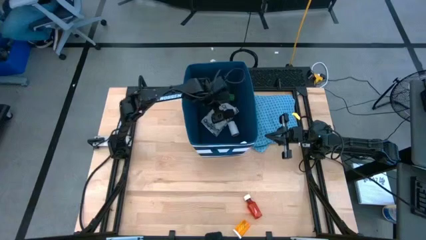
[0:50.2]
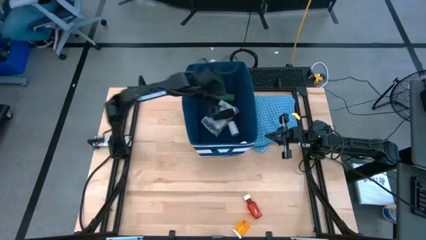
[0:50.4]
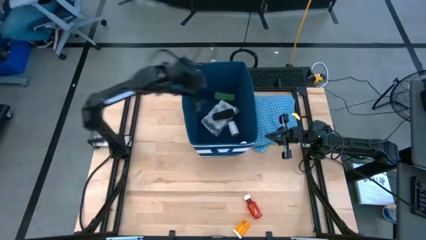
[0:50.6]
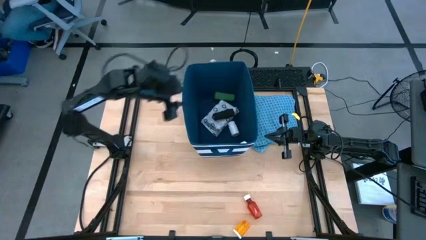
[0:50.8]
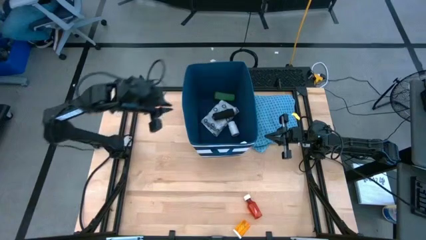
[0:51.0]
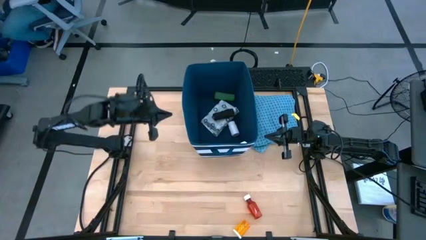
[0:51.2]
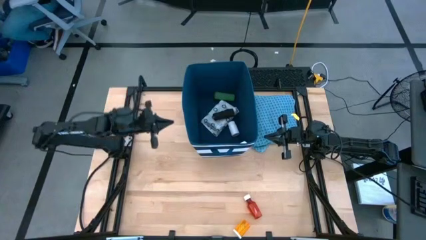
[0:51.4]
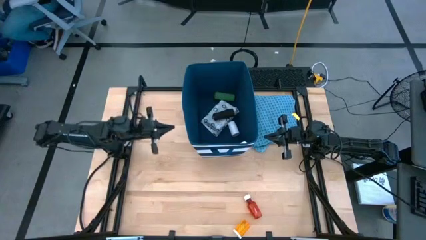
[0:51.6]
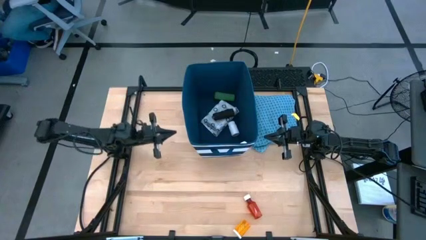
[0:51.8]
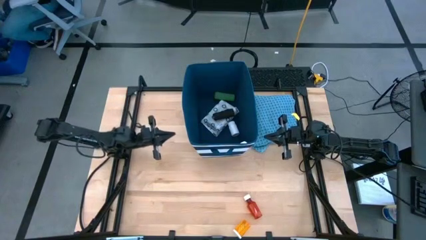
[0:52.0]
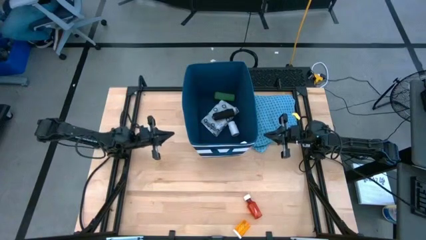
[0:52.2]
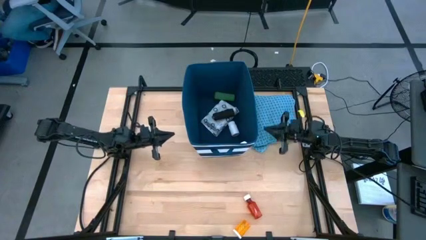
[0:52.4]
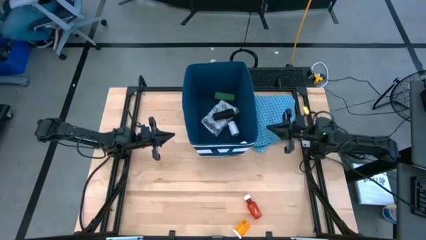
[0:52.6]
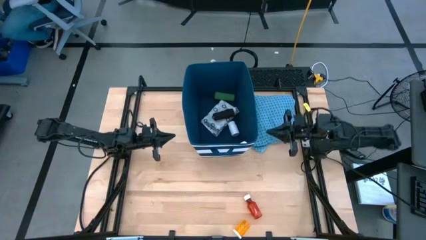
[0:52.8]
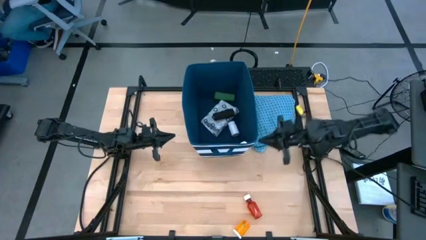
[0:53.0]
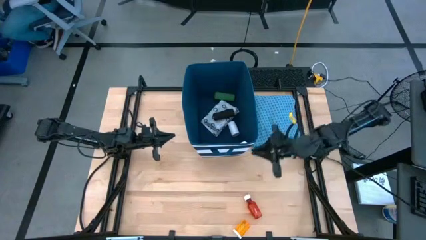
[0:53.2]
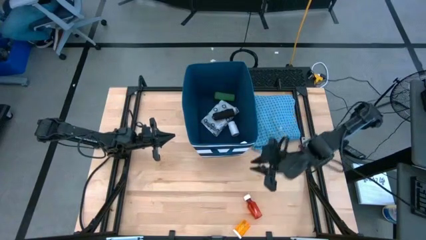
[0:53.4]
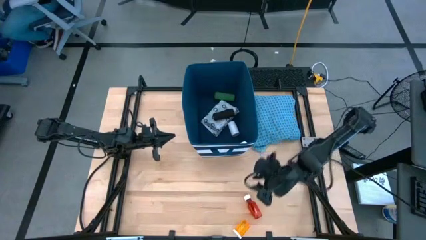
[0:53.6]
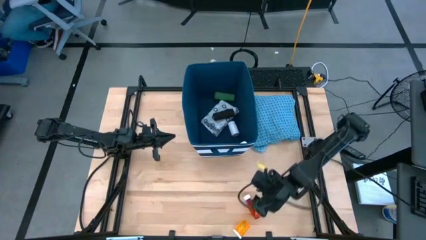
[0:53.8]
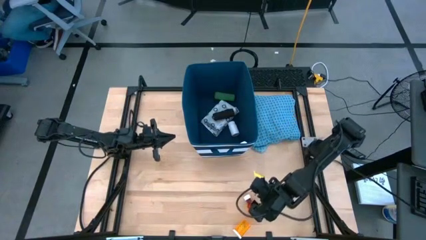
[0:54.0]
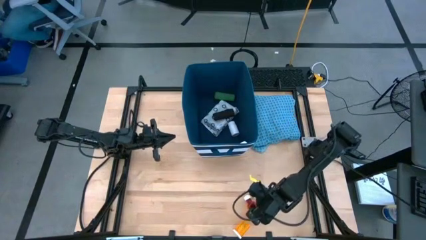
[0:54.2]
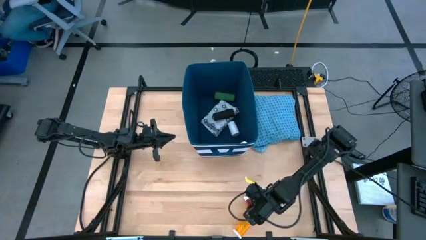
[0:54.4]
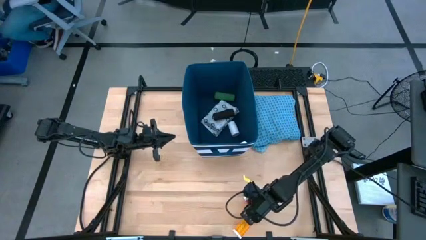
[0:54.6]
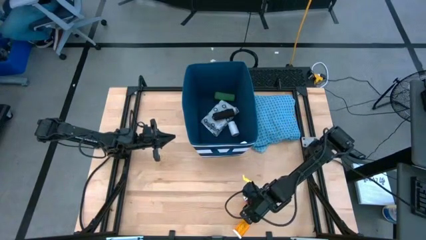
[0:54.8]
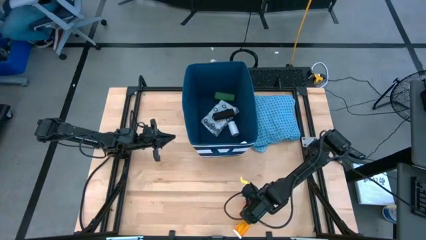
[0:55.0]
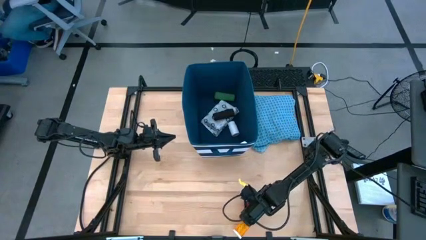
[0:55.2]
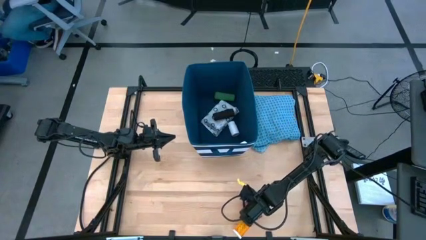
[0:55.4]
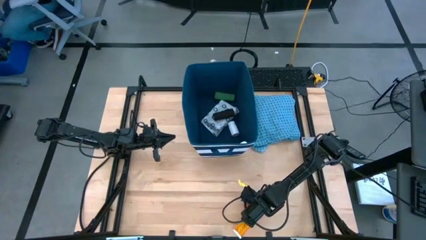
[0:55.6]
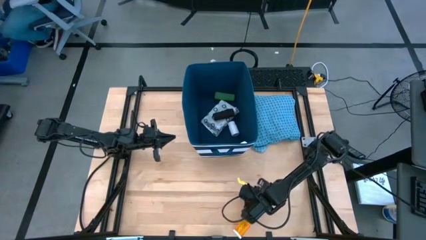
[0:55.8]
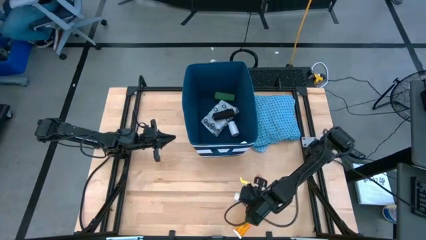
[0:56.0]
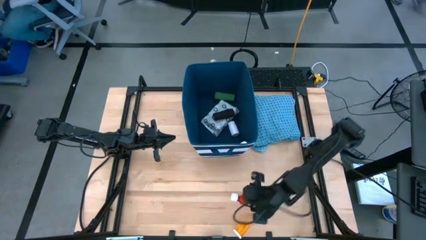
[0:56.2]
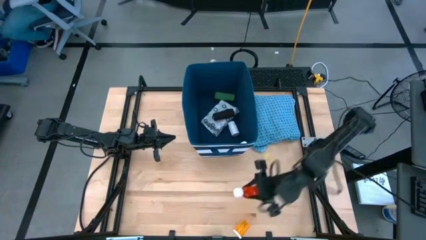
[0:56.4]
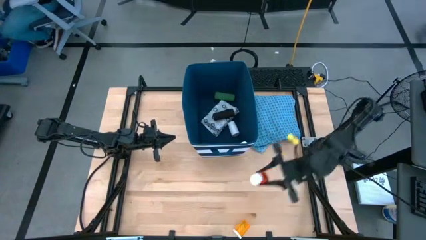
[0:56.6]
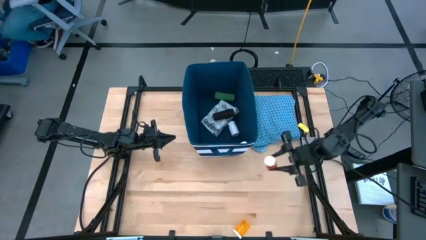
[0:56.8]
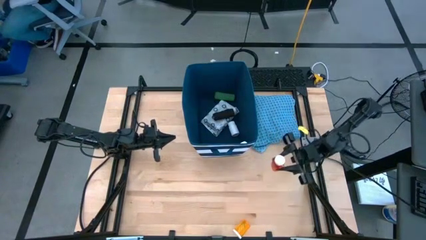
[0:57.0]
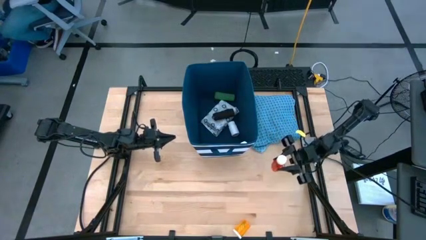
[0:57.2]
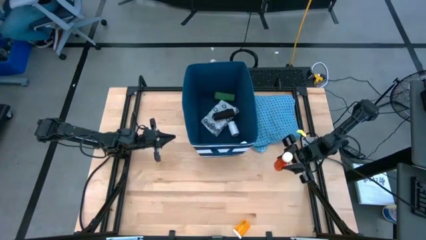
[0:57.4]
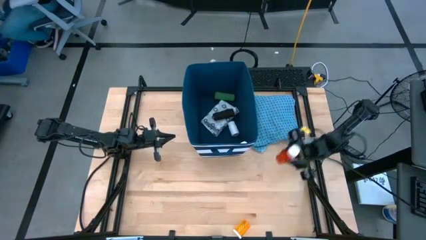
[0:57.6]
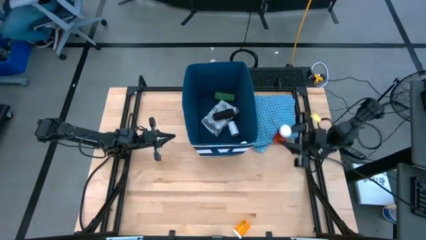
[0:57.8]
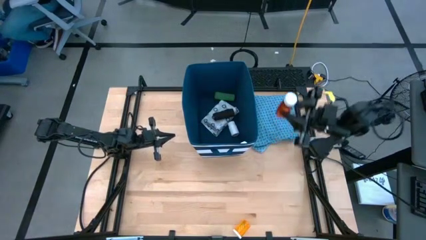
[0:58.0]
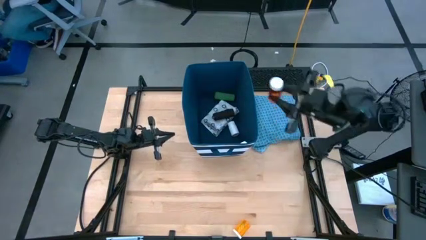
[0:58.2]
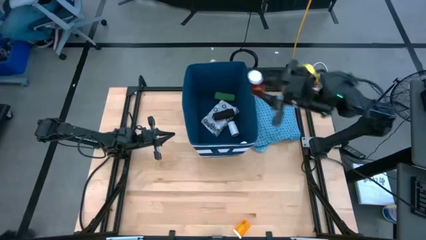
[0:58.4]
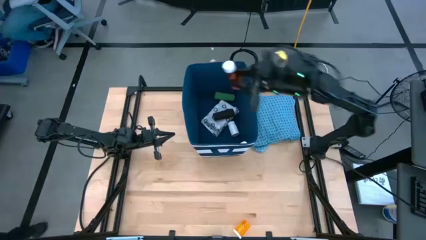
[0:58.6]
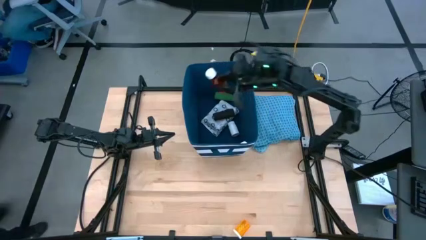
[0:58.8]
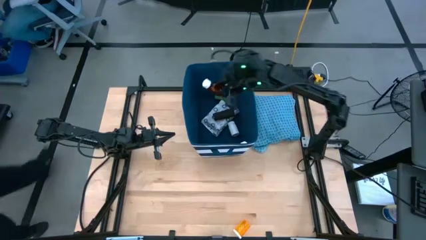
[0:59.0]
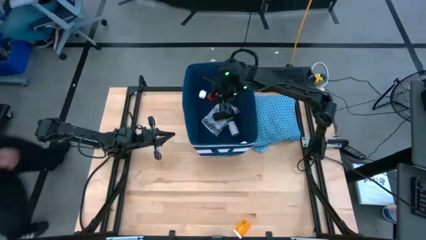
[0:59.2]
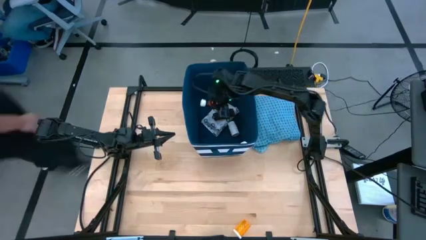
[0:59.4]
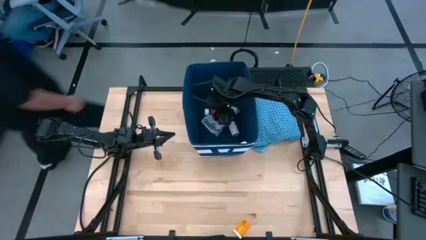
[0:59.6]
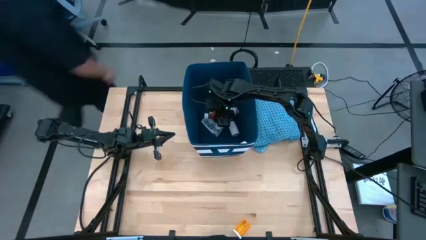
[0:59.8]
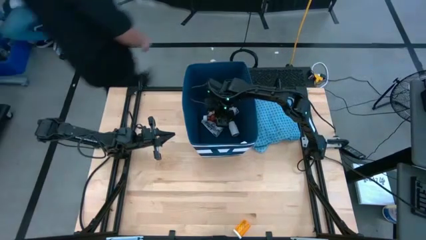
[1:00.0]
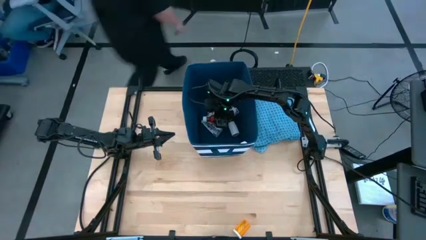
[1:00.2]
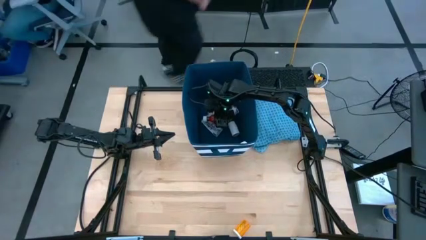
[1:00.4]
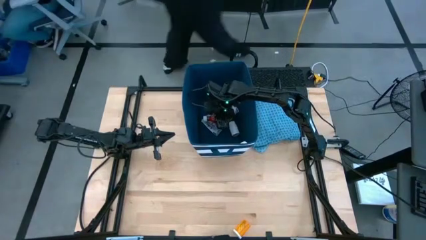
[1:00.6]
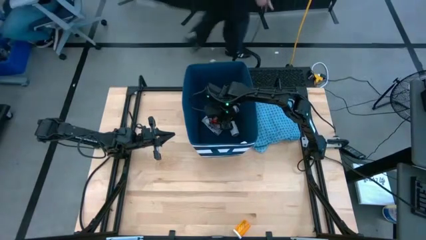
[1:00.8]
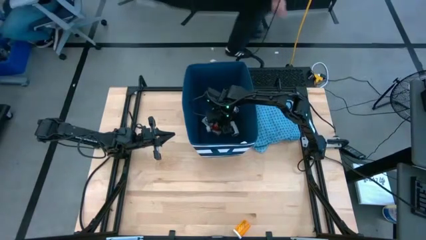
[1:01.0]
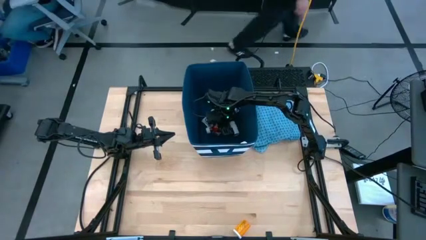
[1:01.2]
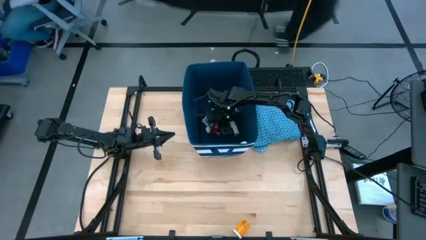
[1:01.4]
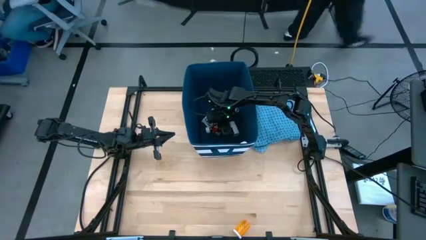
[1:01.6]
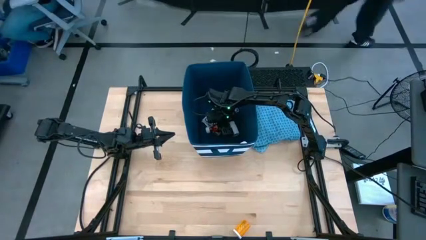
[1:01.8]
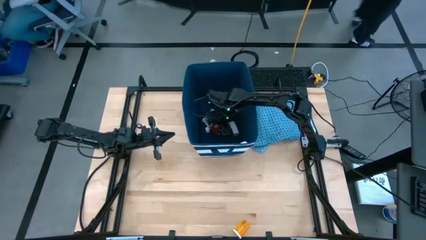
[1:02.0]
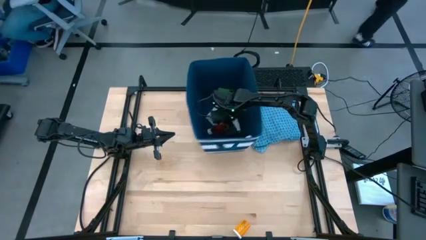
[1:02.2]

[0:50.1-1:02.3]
Task: Pick & place medical supplies in basket/bin
Put the red pill bottle into the blue bin

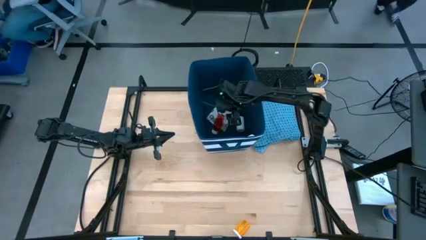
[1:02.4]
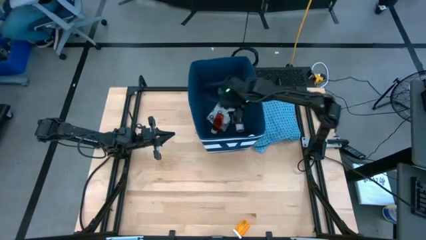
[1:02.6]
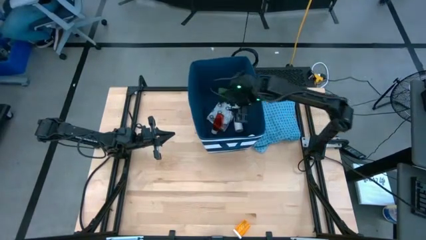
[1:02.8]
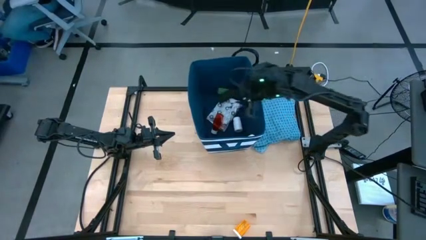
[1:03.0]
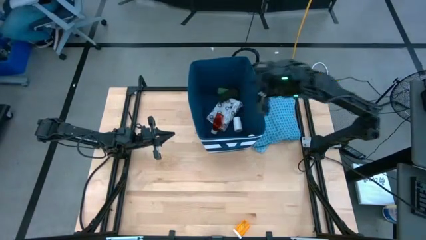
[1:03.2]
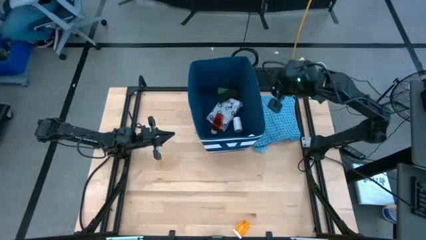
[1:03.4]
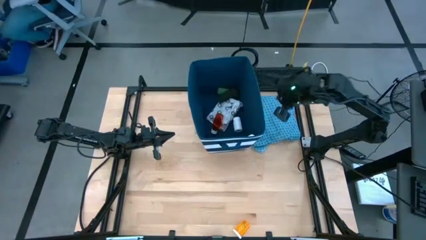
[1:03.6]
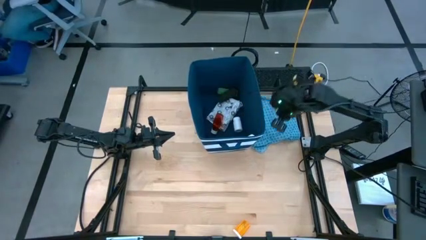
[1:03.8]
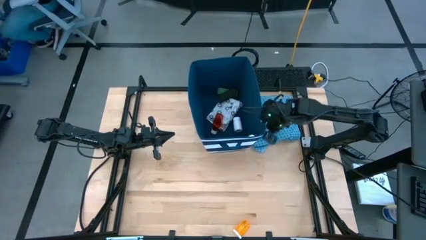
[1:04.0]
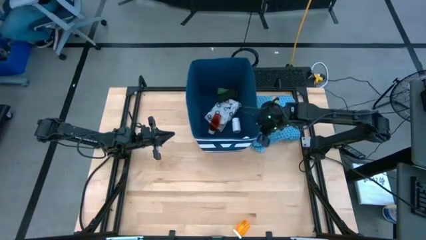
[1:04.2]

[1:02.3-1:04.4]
Adjust the blue bin
